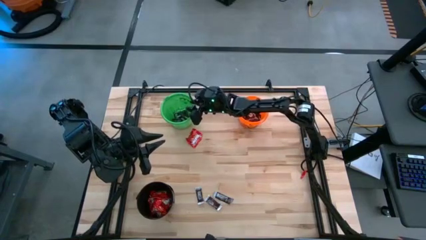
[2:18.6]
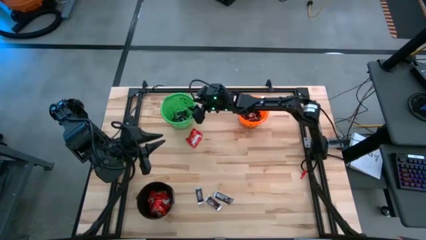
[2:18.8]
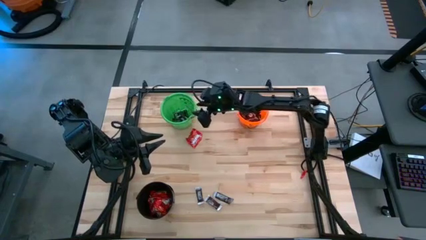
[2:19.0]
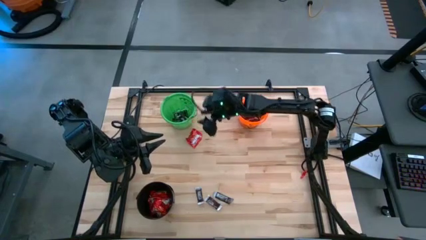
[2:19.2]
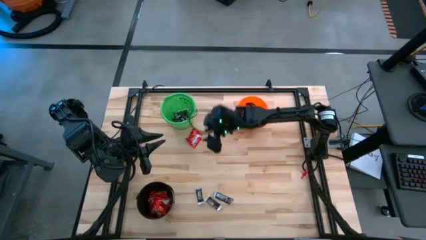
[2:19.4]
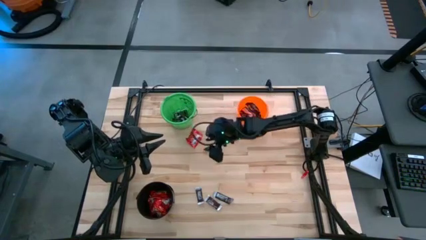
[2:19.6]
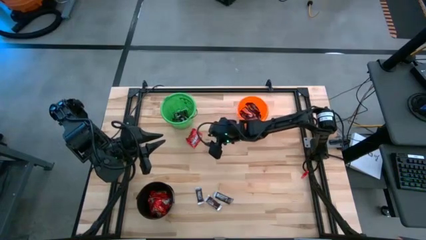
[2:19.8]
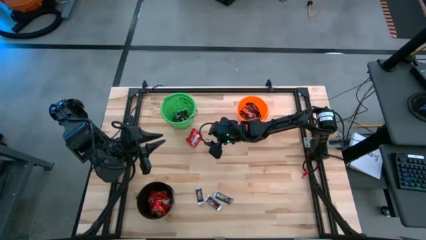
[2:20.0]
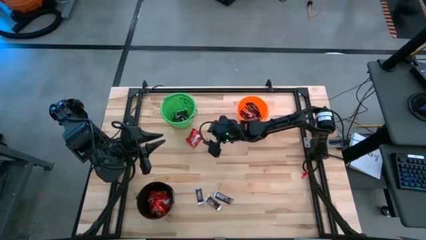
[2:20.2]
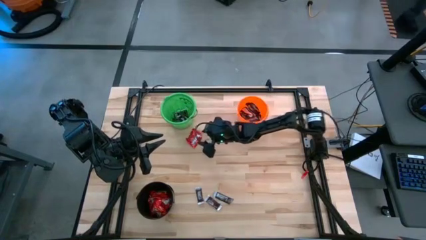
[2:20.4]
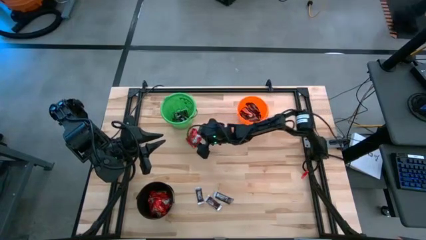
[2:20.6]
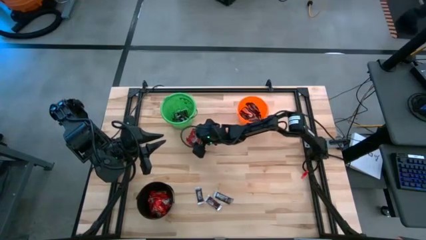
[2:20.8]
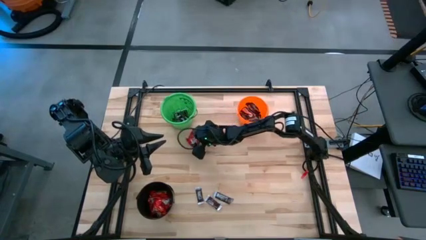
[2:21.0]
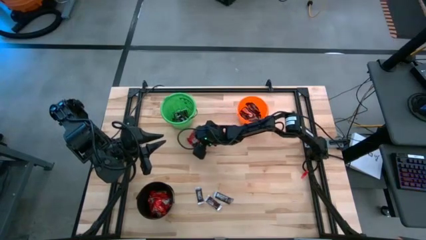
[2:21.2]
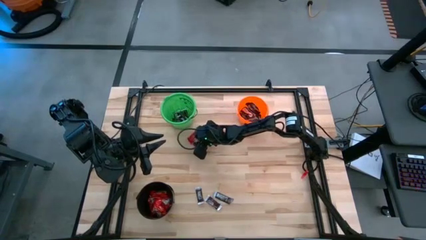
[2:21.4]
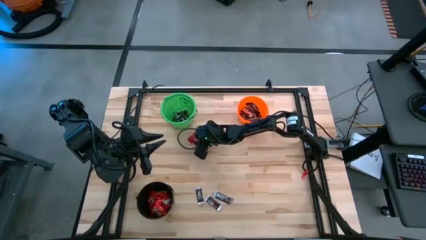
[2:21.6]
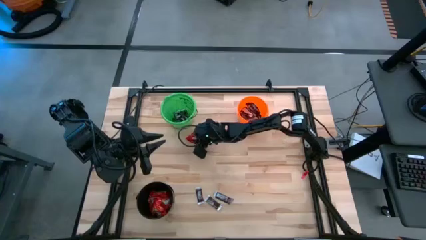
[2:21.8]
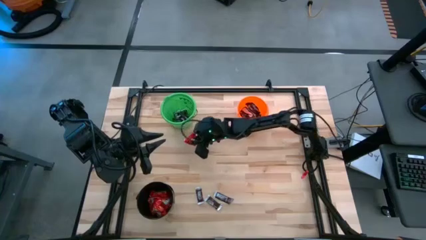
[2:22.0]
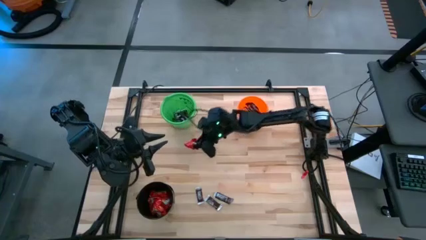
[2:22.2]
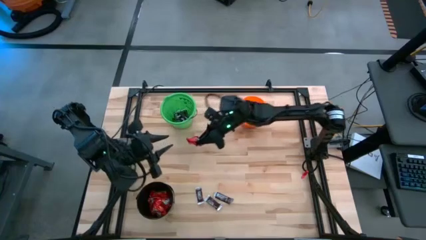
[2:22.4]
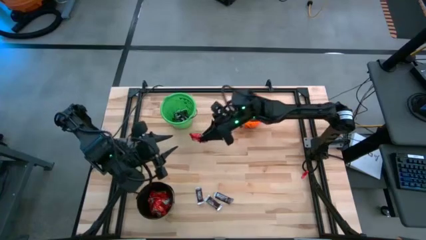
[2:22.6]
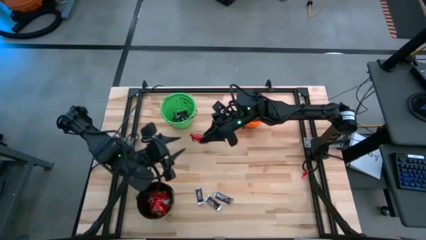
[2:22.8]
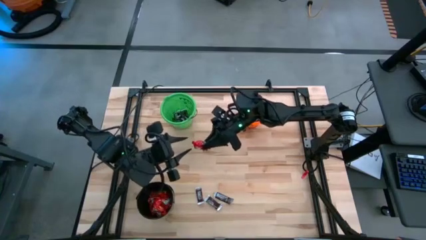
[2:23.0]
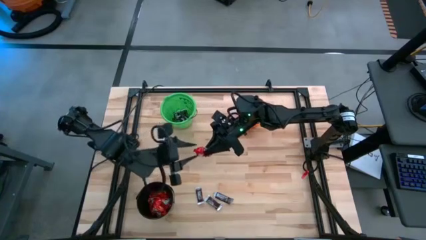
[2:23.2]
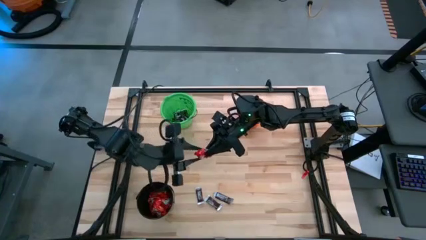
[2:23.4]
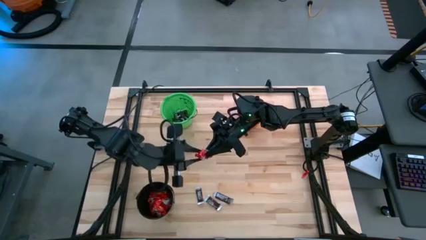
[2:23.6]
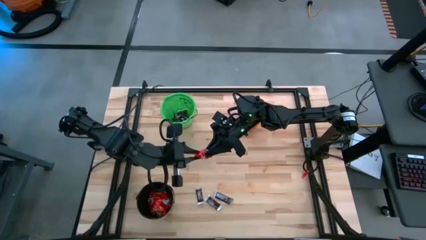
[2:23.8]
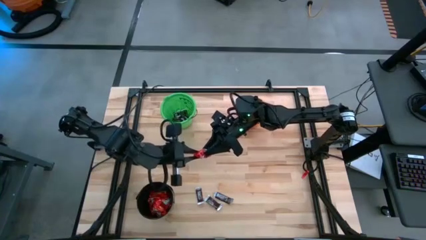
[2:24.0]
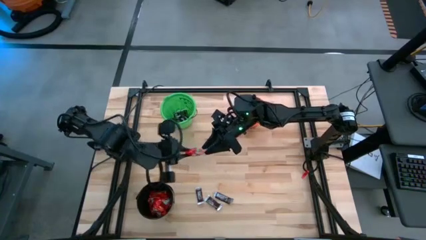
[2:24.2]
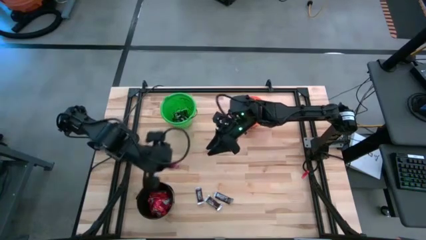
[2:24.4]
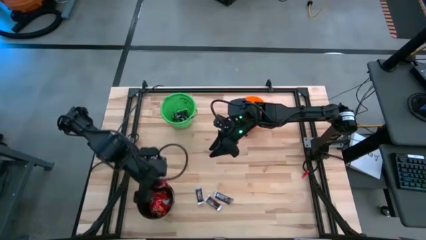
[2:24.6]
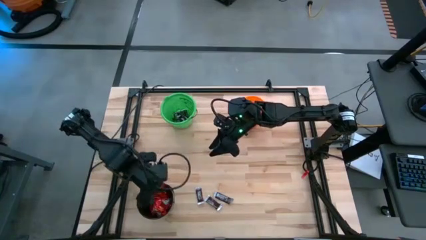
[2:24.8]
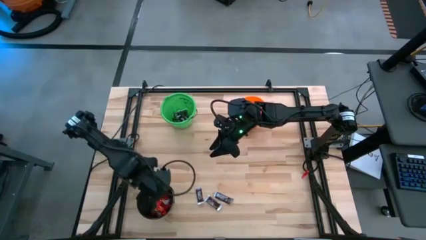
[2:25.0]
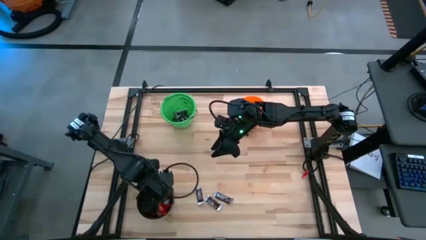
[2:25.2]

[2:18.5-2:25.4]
Task: Sort candy
Put the red candy into the black bucket

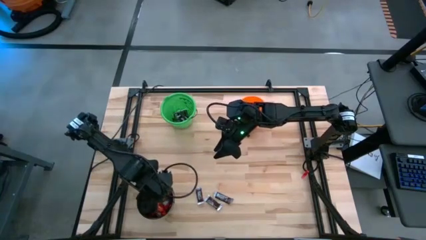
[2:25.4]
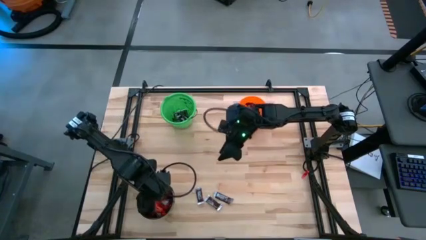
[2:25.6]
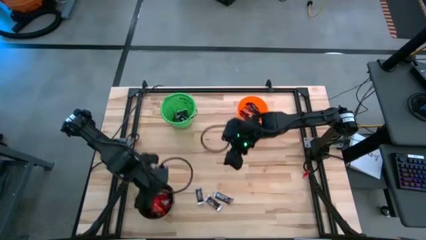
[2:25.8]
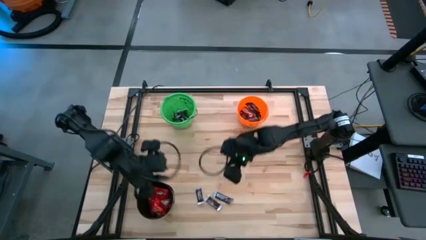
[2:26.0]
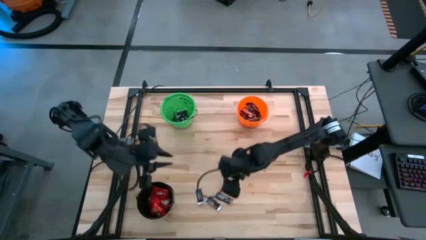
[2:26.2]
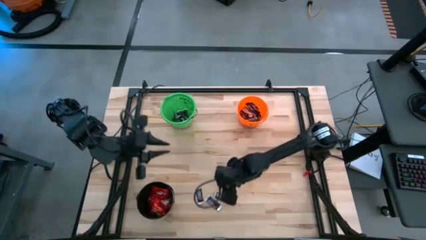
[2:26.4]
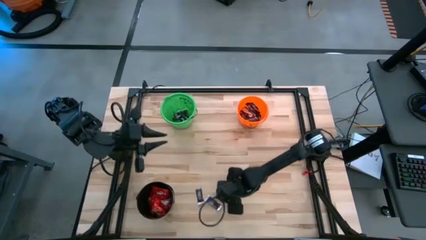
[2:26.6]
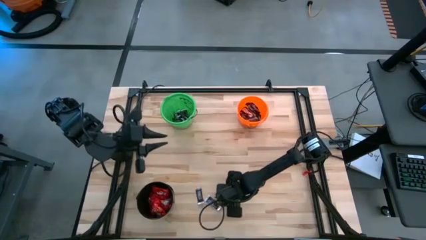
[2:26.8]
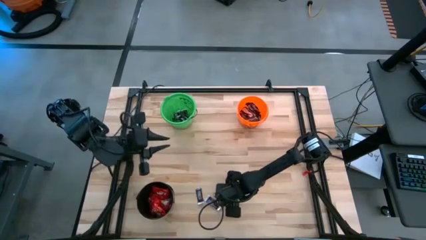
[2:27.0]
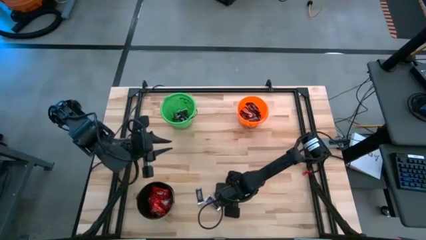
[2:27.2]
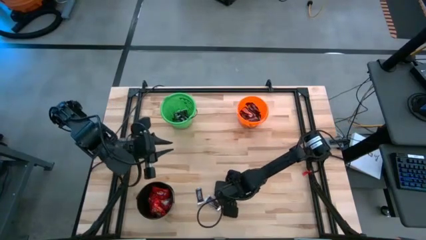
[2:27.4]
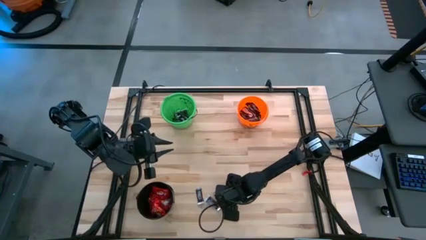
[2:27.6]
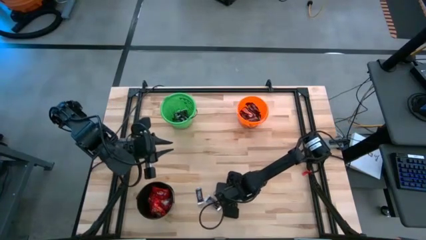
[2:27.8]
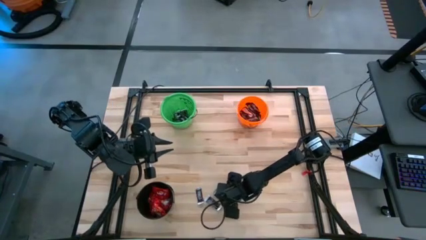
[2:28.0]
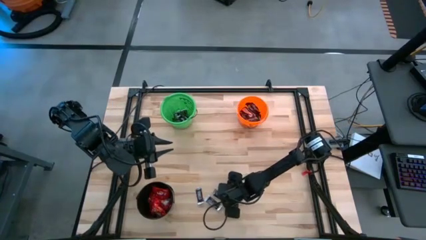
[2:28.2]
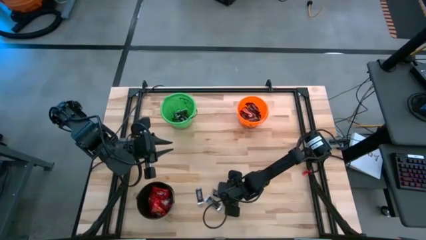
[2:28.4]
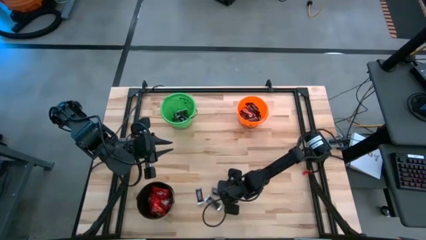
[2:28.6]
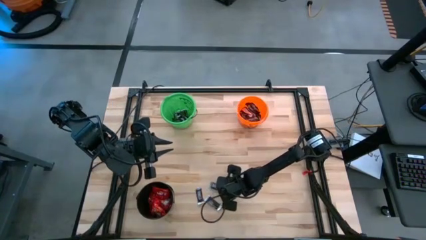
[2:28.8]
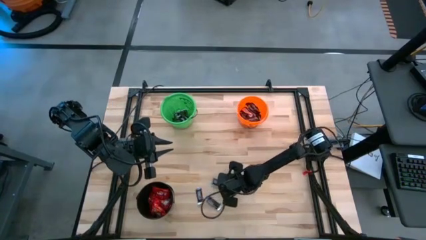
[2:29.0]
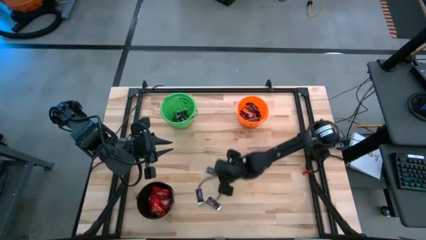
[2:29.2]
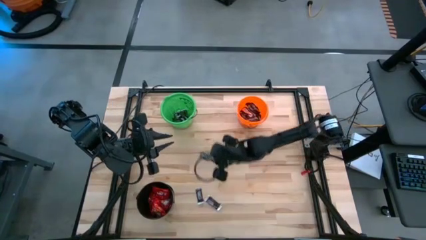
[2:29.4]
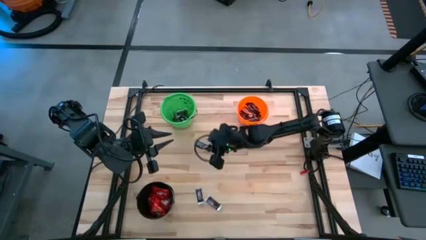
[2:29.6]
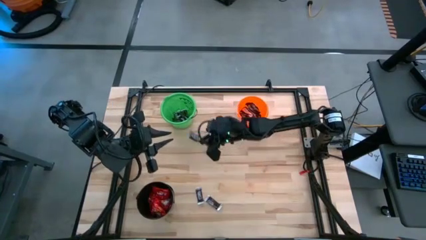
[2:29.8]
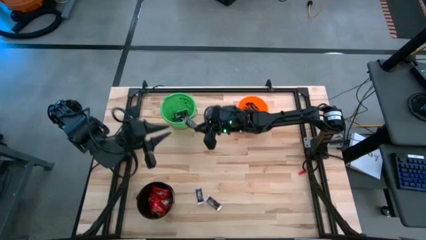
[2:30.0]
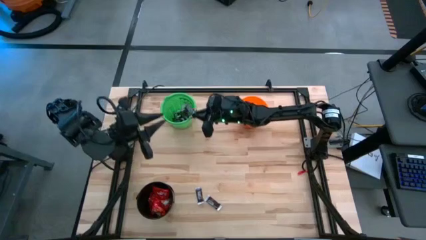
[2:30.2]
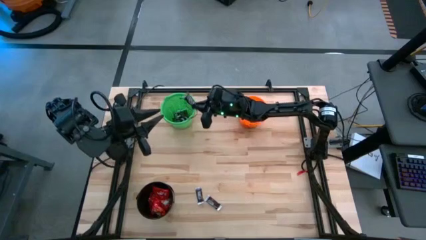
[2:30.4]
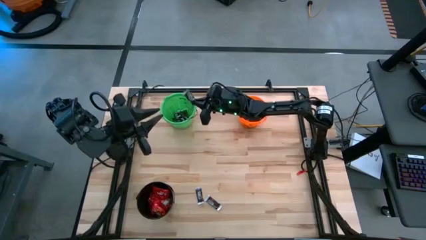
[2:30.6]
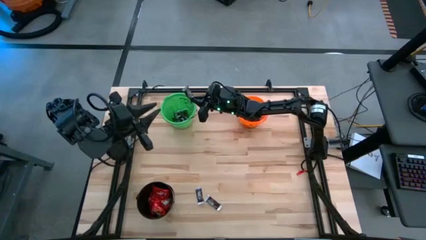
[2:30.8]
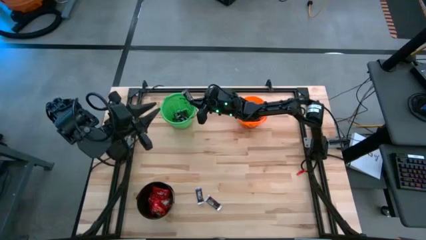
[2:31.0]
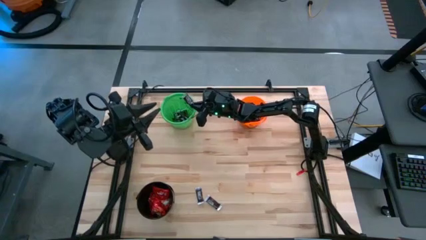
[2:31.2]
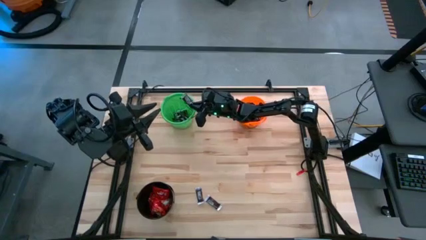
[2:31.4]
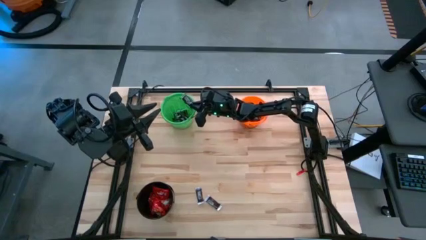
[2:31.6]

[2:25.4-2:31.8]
Put the black chocolate into the green bucket

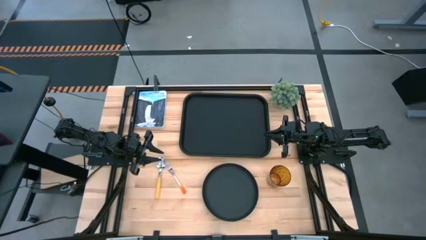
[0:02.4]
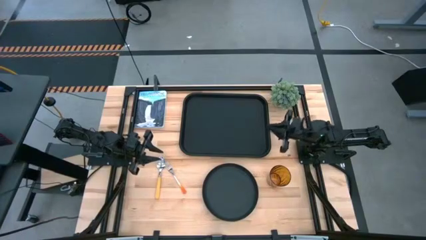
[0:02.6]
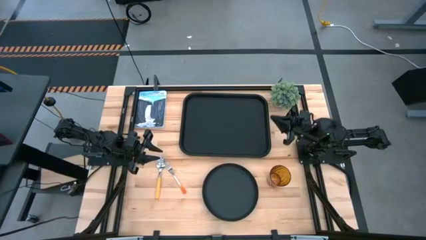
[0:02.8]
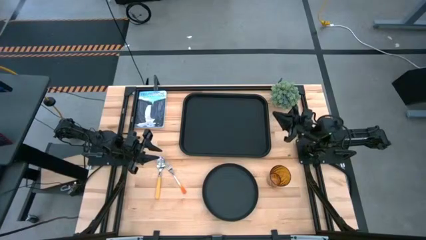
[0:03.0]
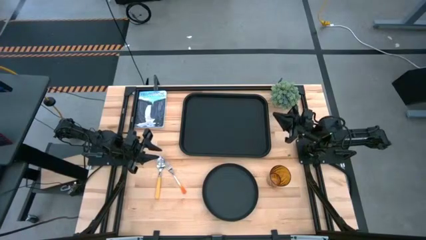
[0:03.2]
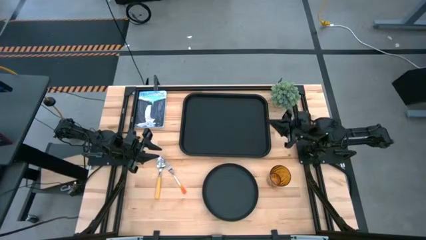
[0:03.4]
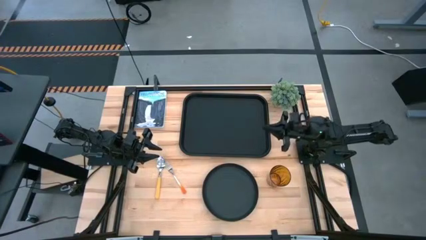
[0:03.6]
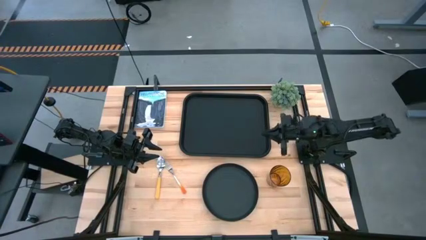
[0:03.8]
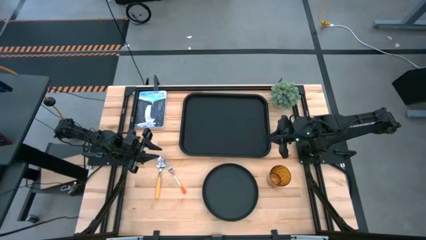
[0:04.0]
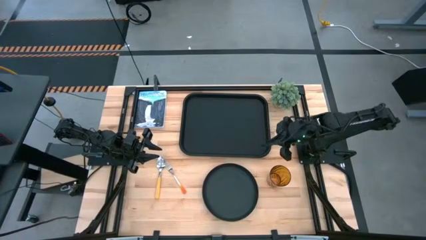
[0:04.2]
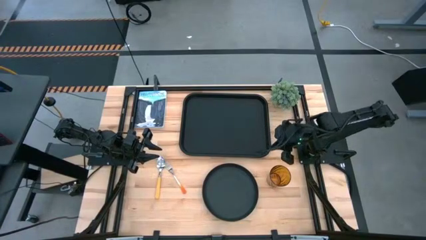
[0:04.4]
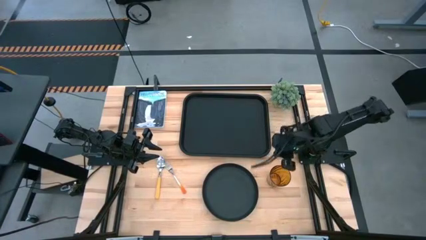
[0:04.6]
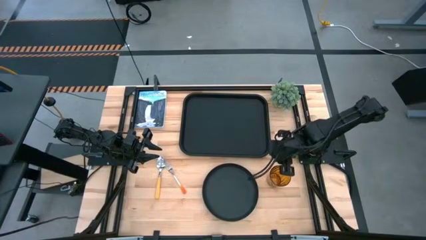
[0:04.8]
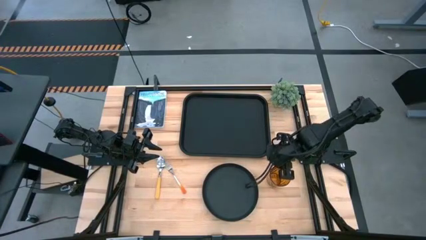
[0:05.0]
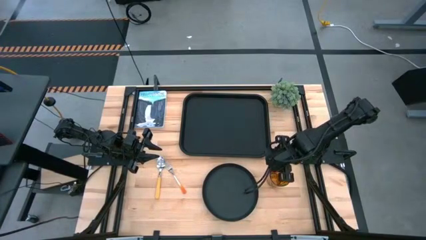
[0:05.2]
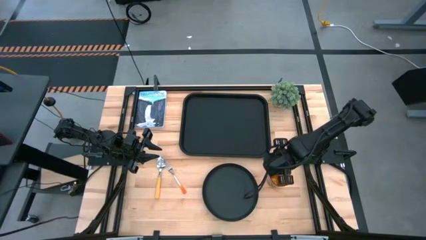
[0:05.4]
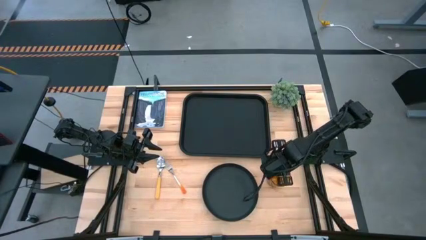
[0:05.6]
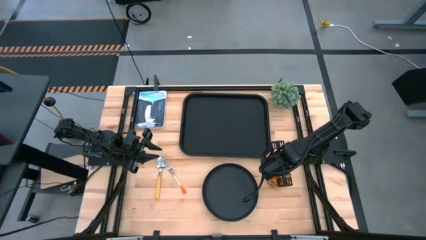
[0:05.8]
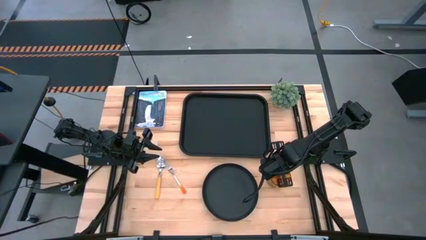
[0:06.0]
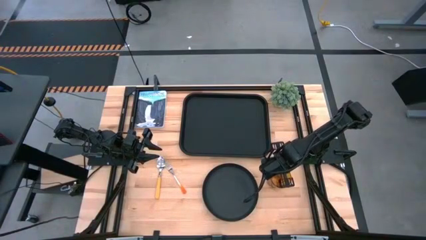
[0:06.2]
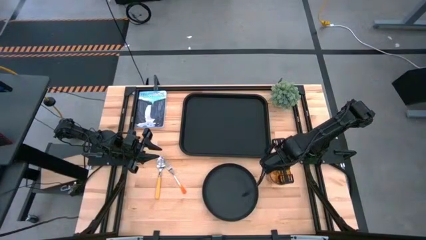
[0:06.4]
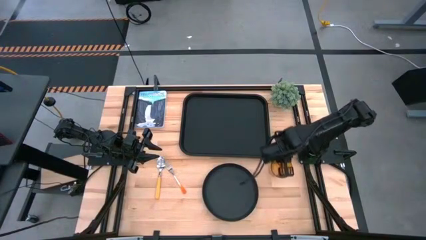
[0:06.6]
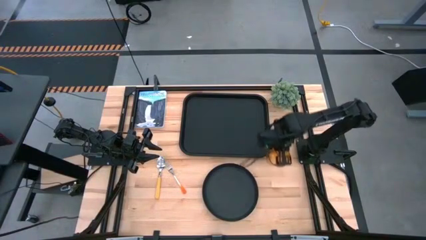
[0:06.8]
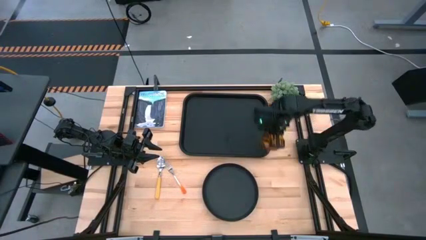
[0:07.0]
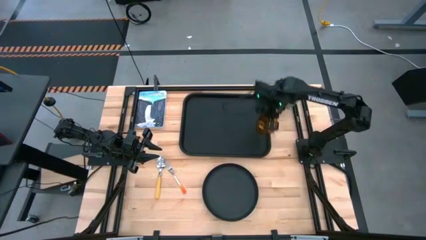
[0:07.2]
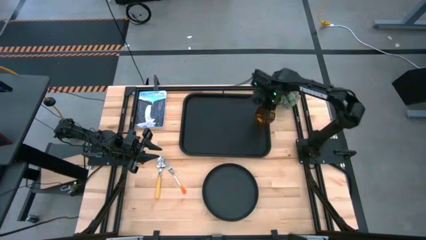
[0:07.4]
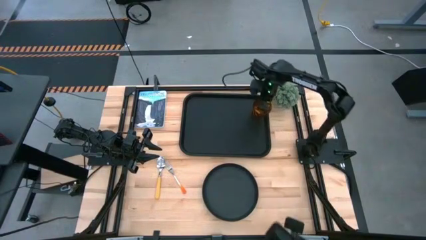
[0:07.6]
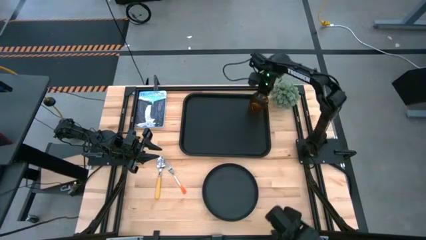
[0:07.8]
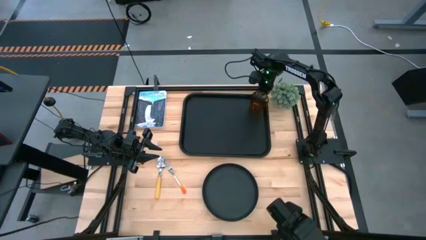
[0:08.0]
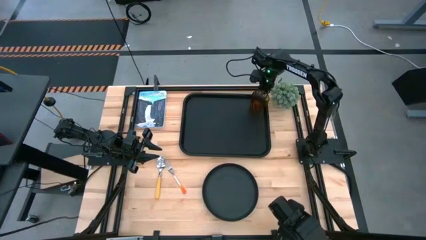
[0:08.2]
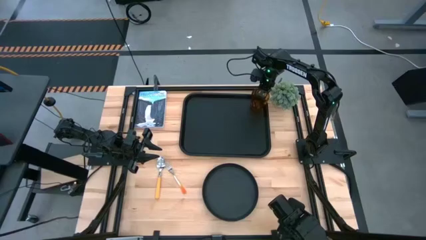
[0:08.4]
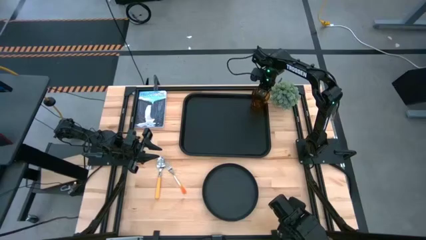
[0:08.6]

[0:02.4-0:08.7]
Task: Pick and place plate/cup/fork/spoon on tray
Put the orange glass on the black tray
